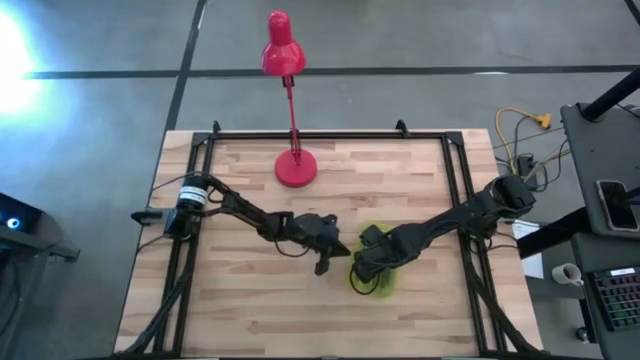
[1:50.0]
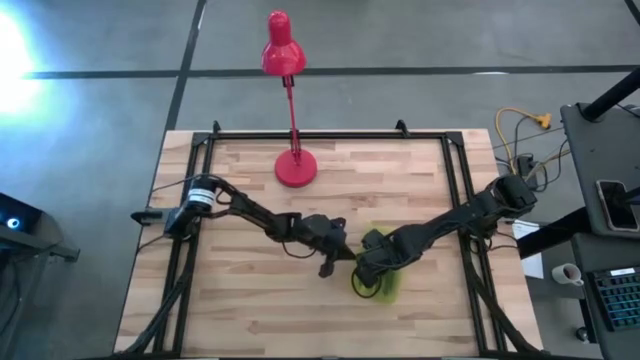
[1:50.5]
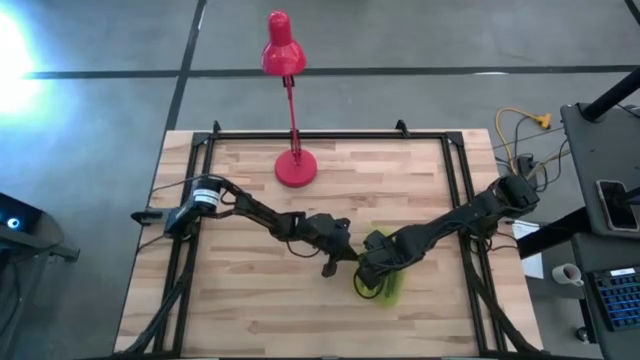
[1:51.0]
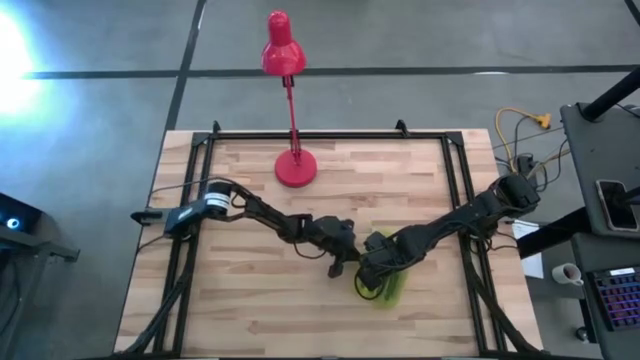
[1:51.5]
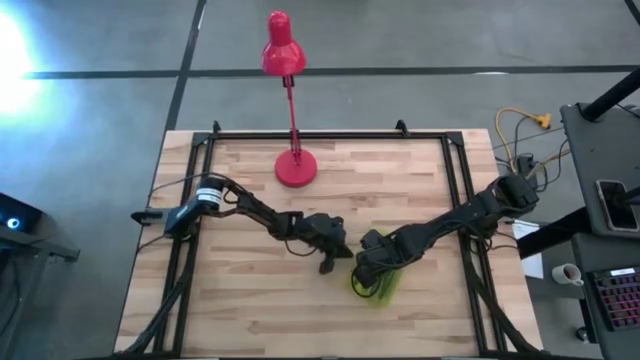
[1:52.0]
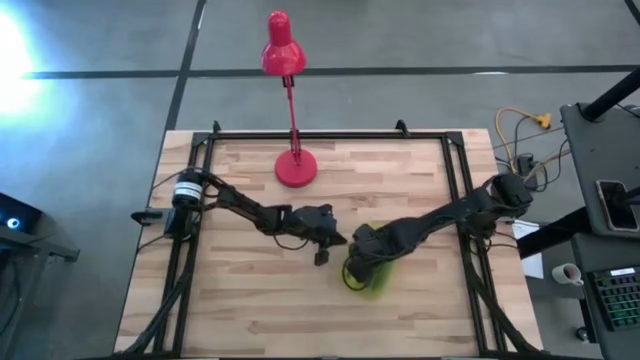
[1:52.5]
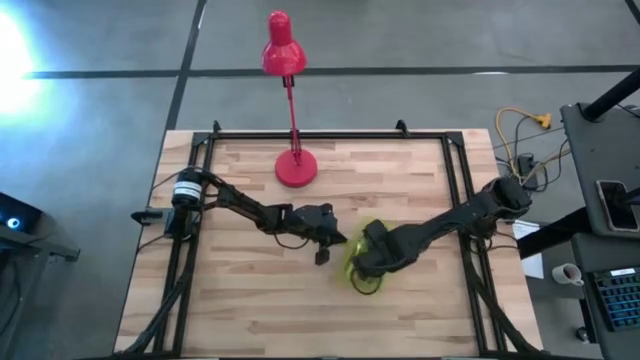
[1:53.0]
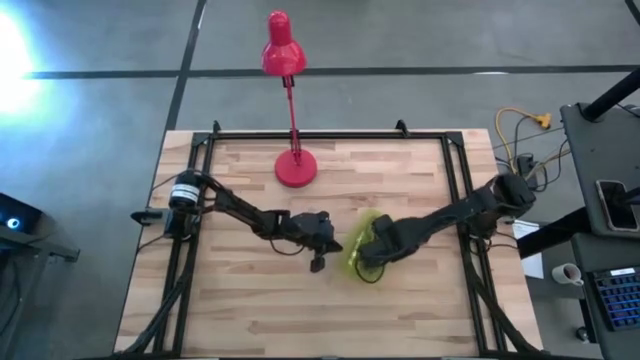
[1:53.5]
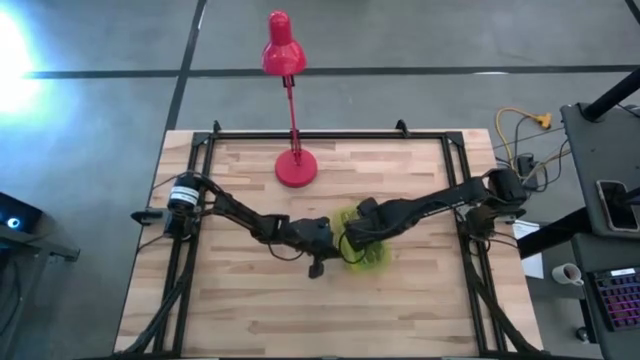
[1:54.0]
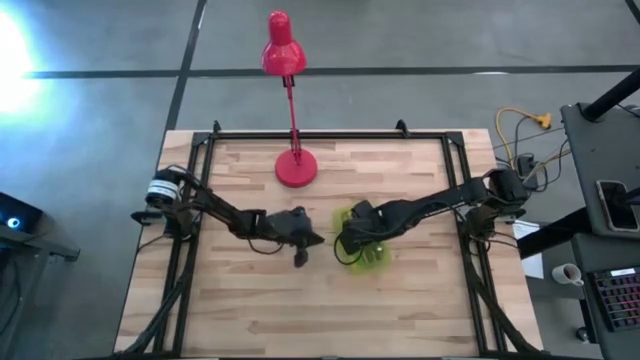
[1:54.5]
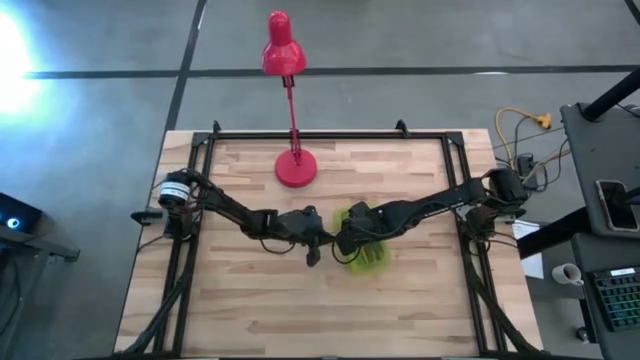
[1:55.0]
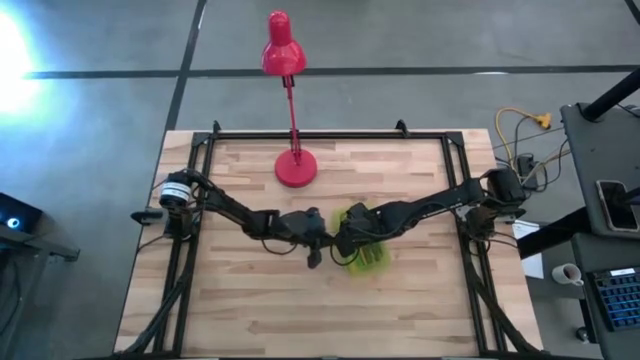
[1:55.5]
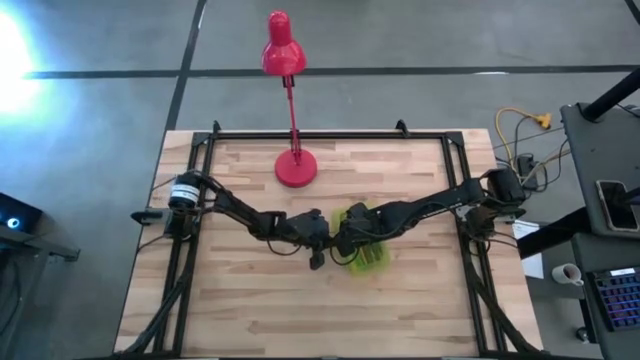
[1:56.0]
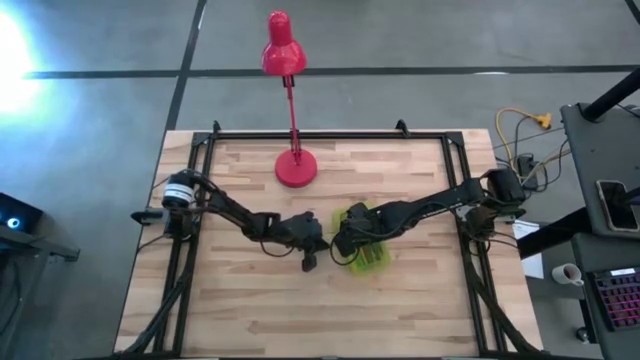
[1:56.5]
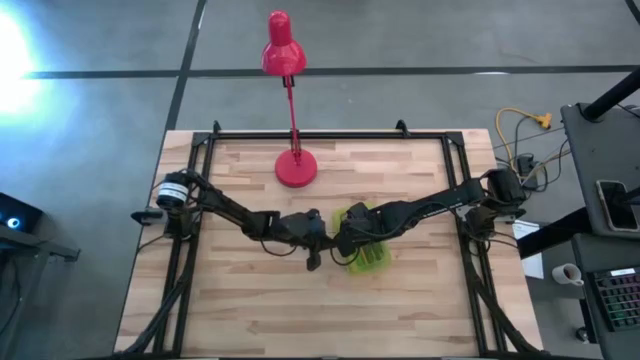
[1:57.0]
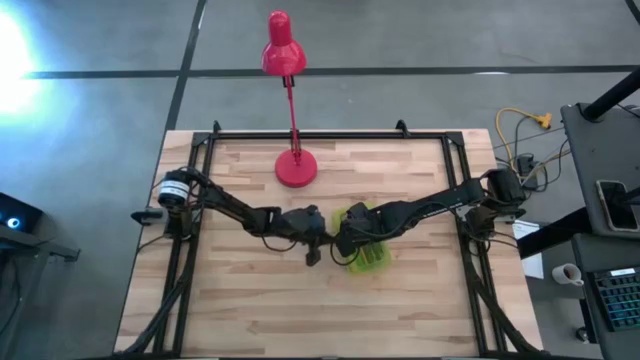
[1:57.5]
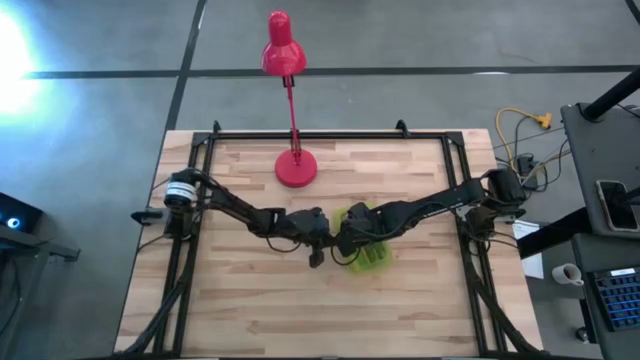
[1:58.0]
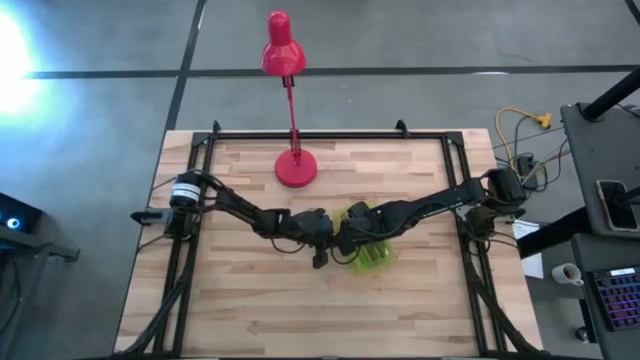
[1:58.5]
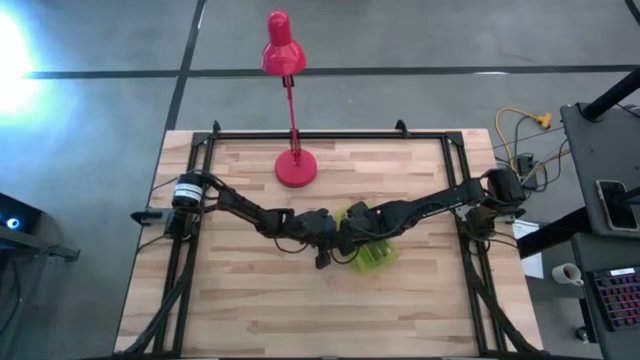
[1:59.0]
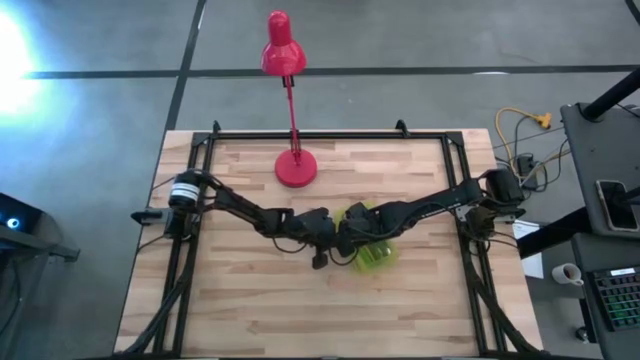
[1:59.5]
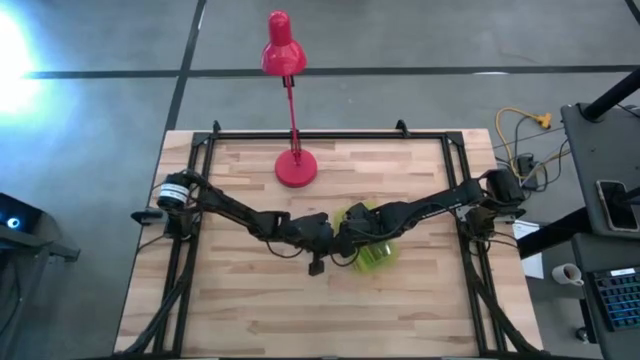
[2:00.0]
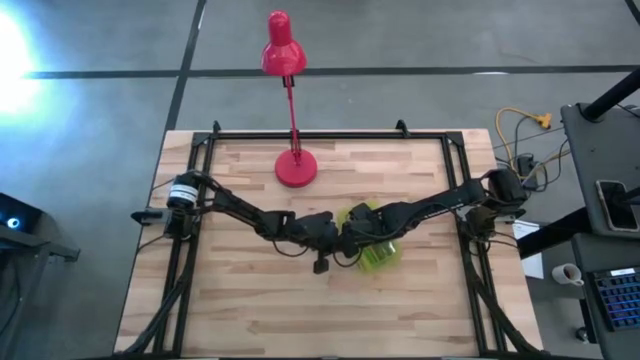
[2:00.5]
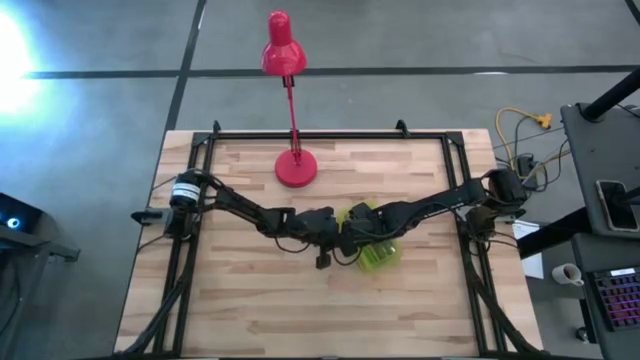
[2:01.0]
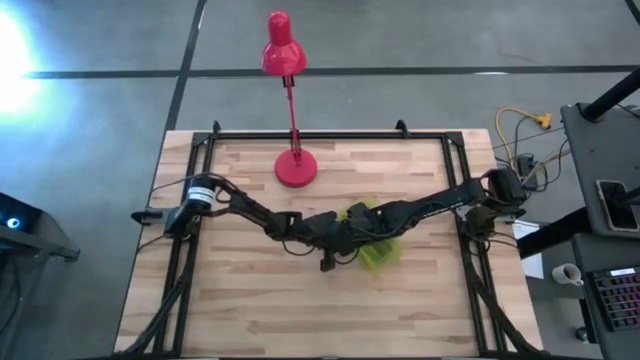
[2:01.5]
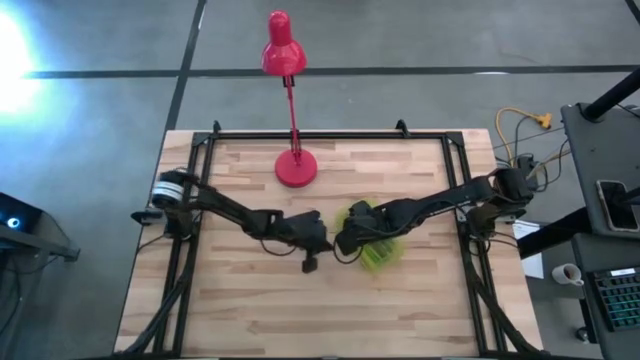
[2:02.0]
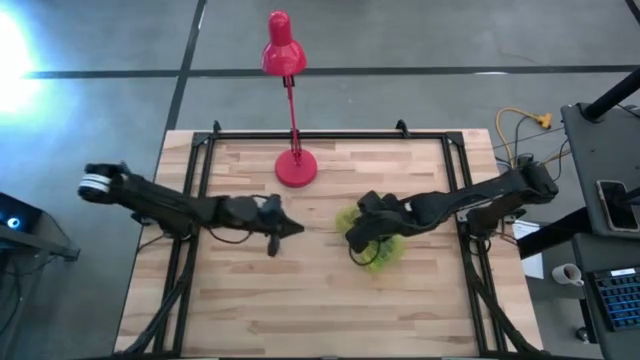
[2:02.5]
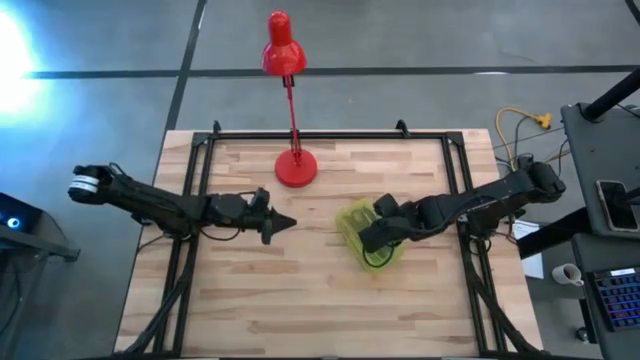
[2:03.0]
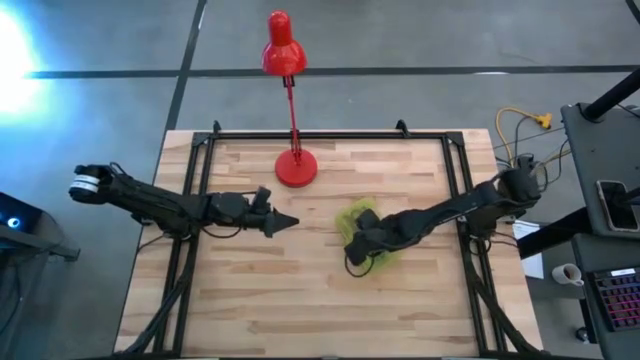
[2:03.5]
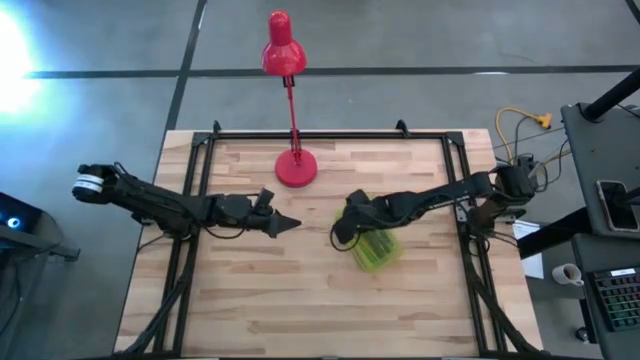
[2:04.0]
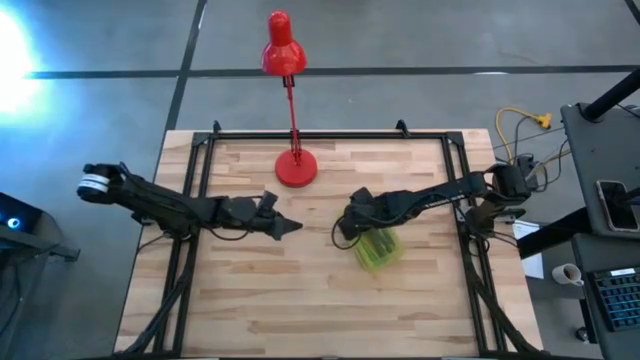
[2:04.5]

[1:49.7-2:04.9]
Task: Pick & place school supplies into a supply box
Close the yellow supply box

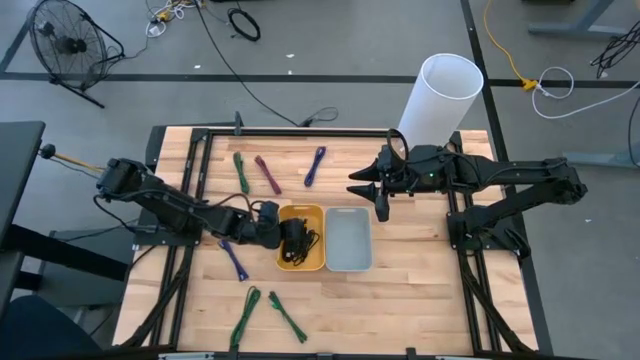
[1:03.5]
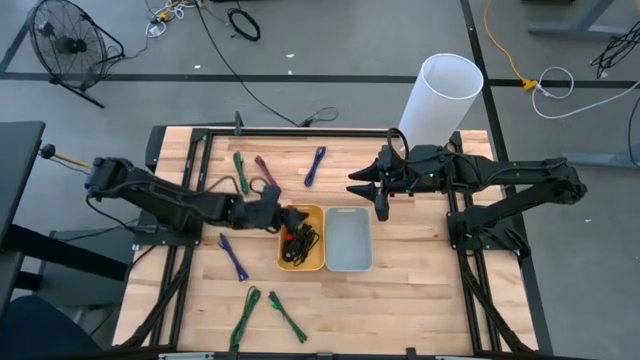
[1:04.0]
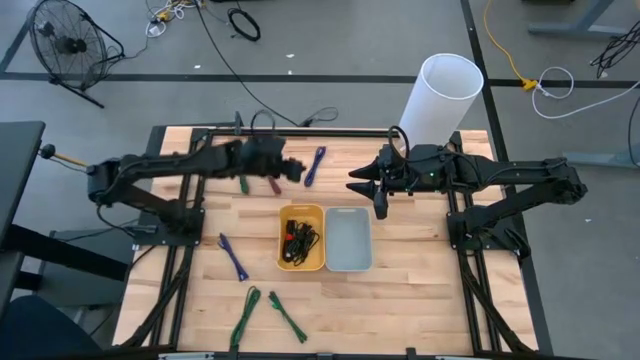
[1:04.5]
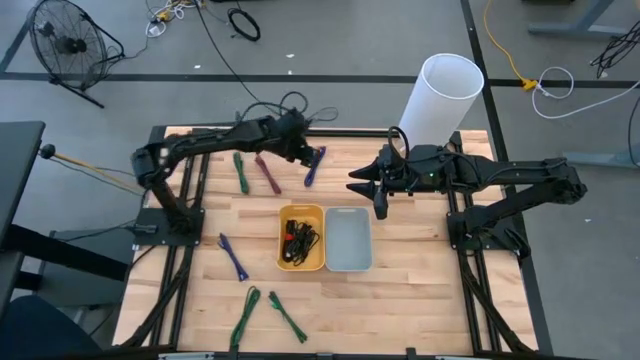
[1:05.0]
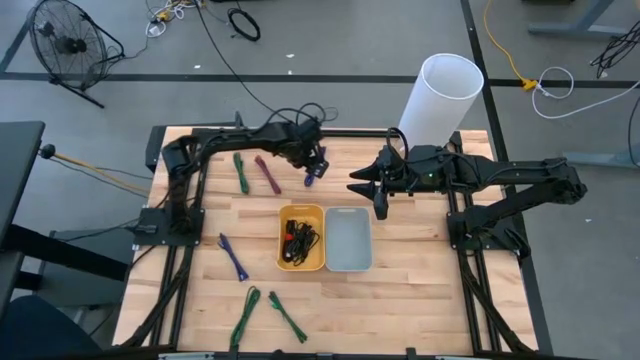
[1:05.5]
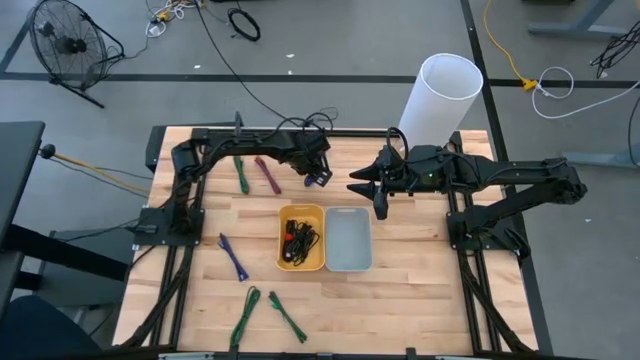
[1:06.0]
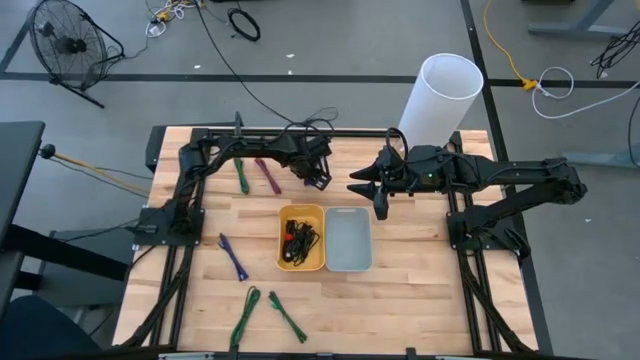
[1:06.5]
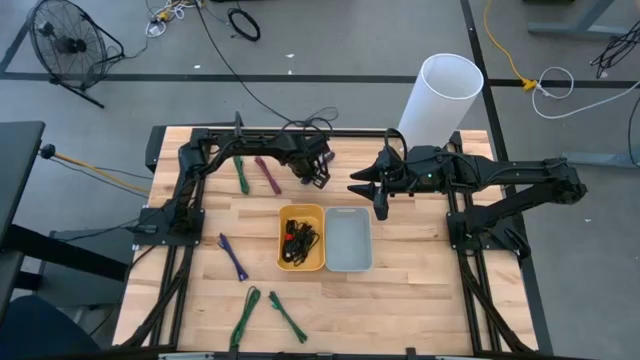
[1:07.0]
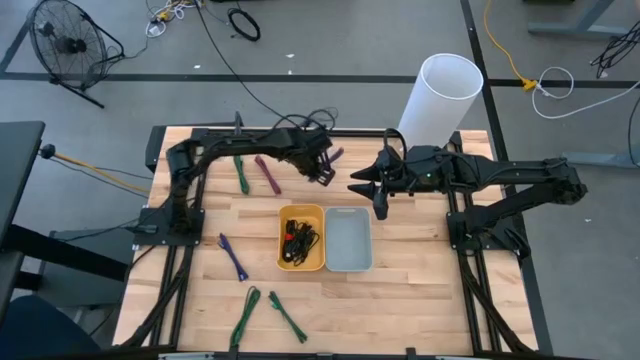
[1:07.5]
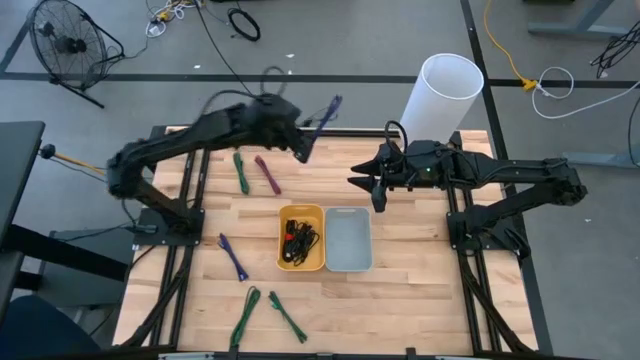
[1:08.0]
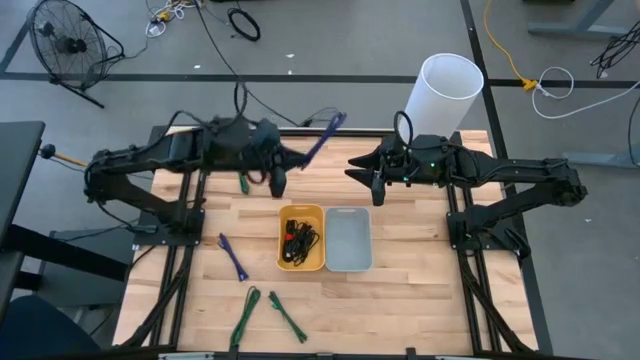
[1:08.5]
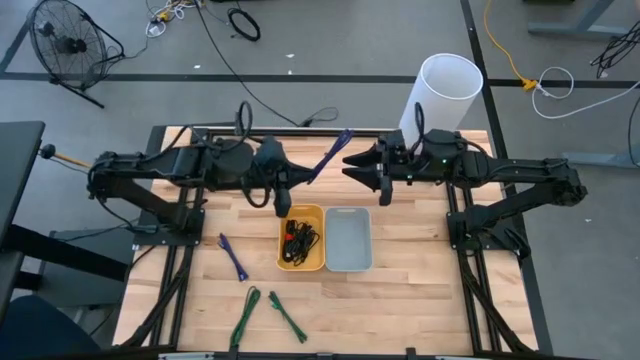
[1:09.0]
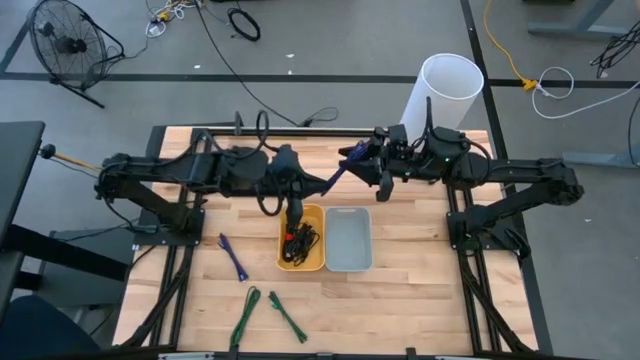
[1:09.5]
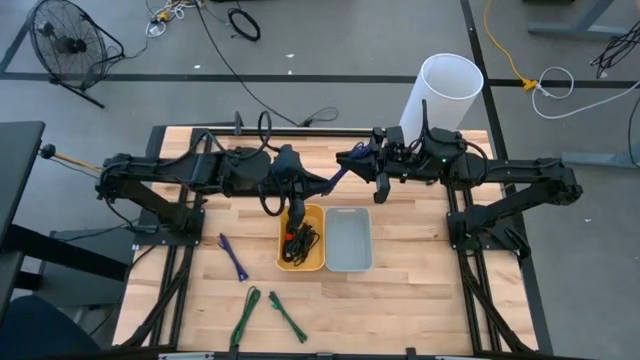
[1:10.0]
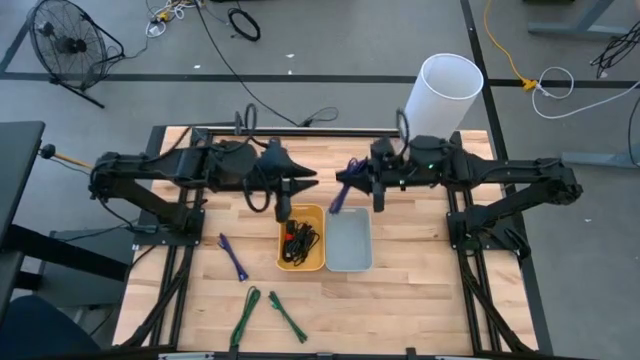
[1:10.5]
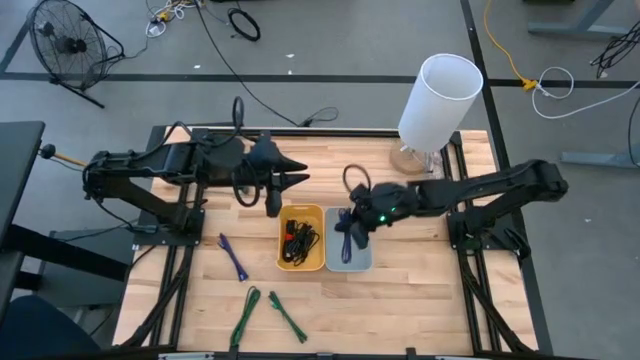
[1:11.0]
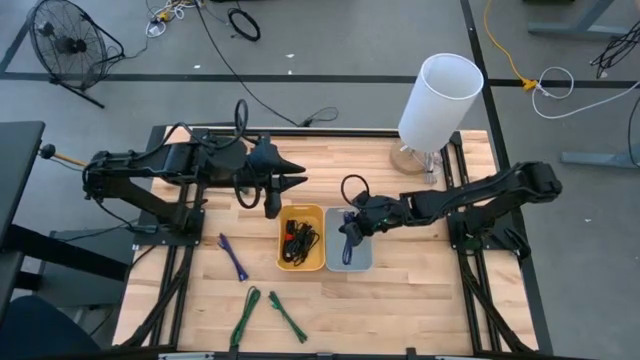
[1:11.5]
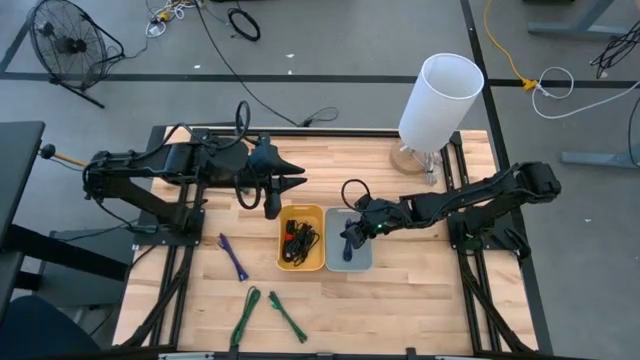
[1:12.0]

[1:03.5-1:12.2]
Task: Pick & Place USB Port
Put the black violet charger cable into the gray bin
